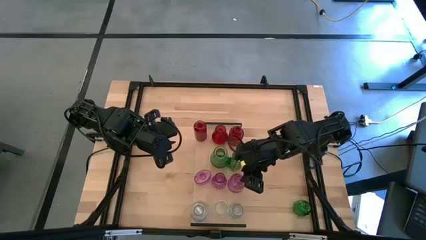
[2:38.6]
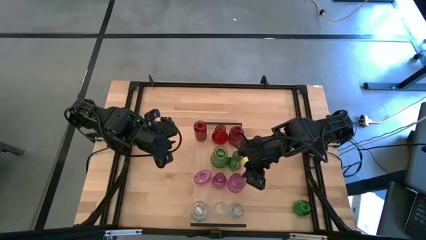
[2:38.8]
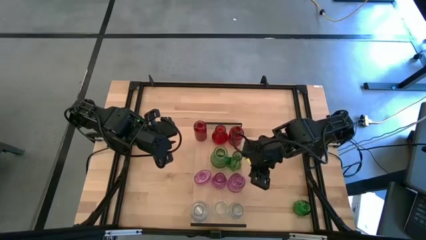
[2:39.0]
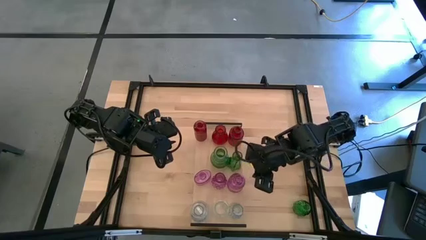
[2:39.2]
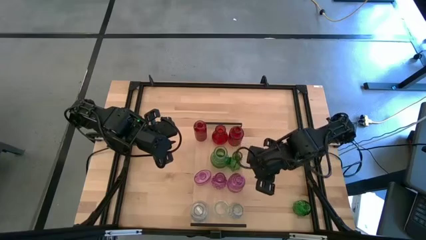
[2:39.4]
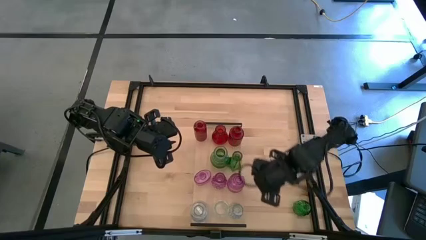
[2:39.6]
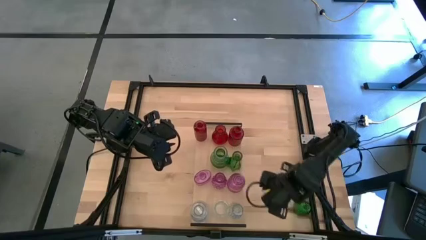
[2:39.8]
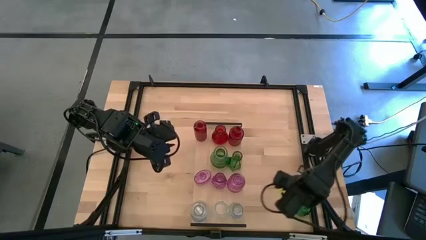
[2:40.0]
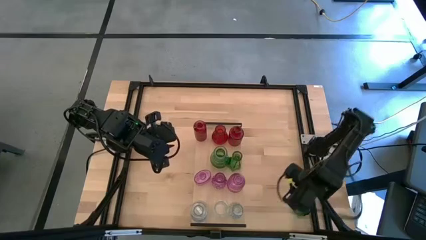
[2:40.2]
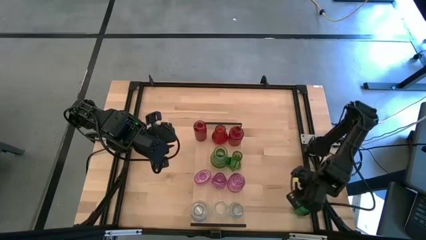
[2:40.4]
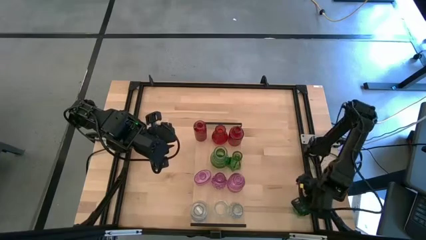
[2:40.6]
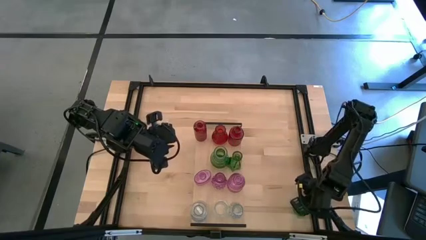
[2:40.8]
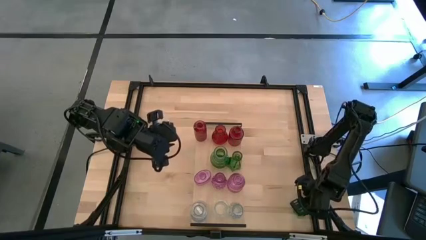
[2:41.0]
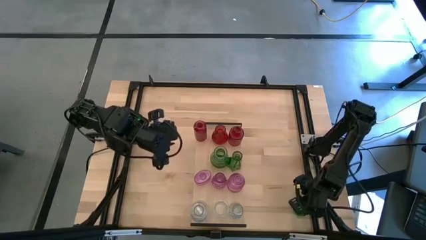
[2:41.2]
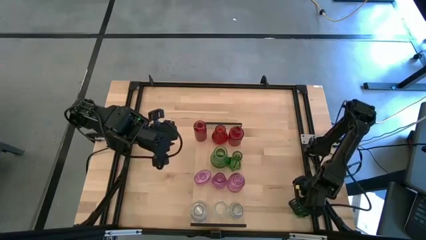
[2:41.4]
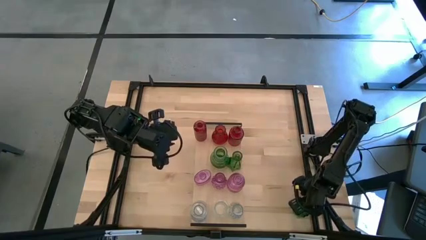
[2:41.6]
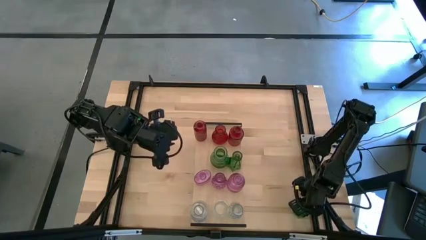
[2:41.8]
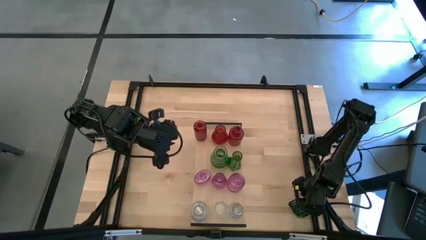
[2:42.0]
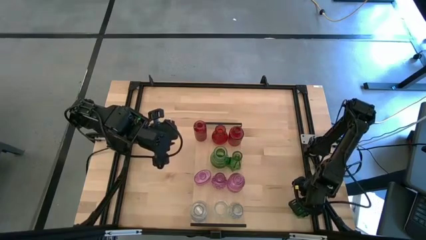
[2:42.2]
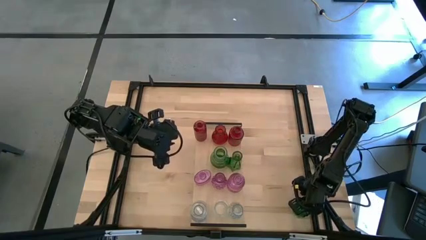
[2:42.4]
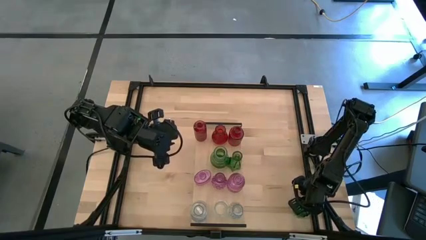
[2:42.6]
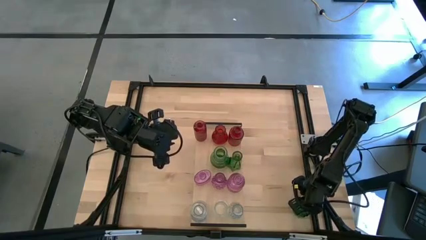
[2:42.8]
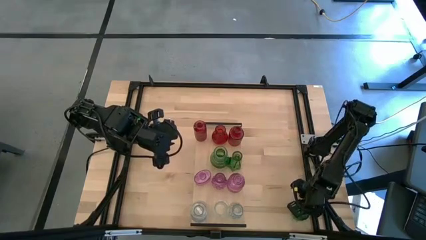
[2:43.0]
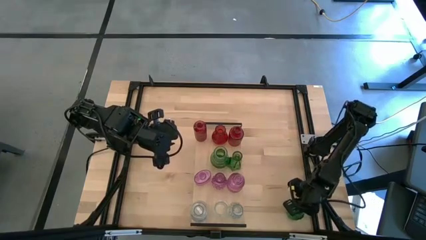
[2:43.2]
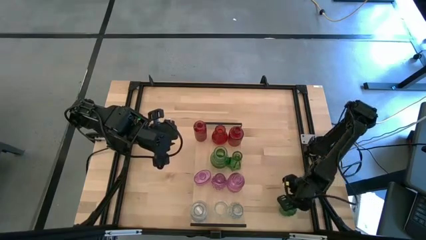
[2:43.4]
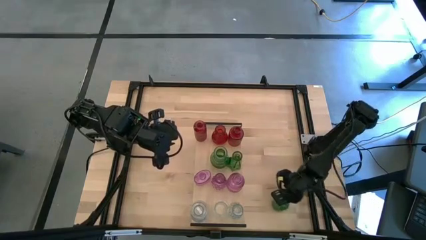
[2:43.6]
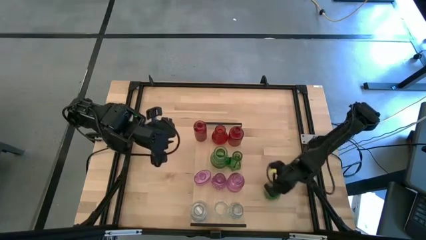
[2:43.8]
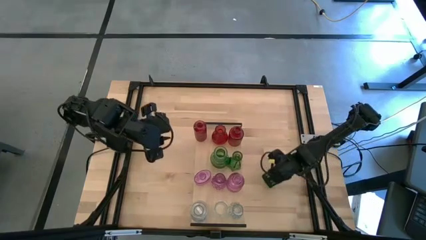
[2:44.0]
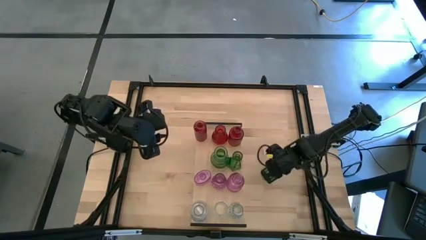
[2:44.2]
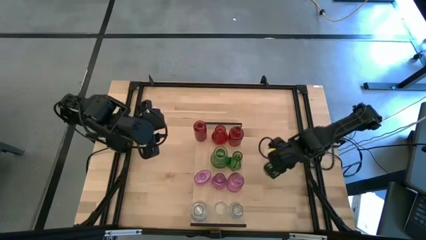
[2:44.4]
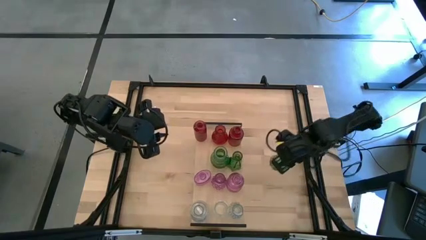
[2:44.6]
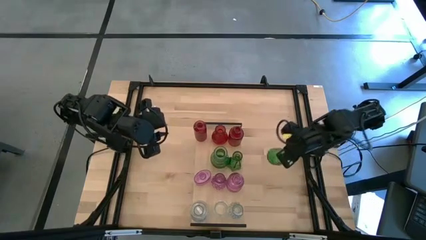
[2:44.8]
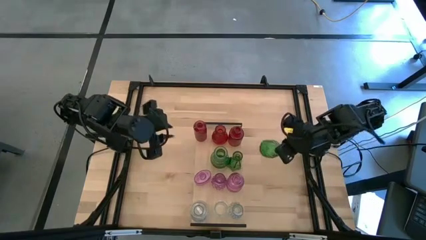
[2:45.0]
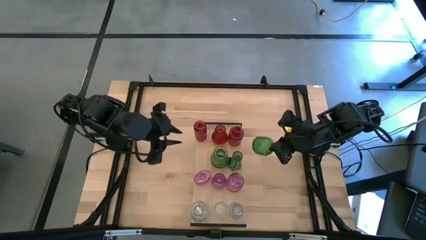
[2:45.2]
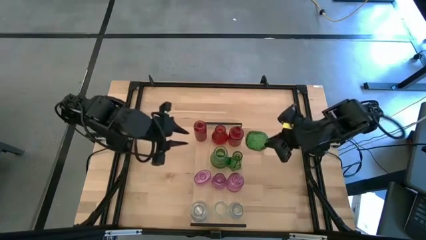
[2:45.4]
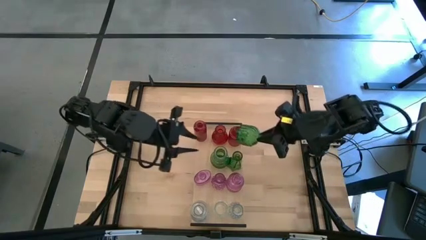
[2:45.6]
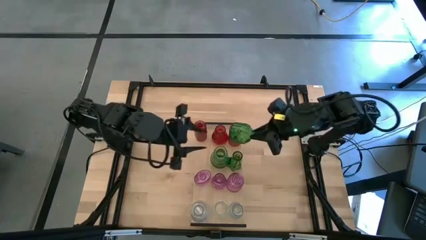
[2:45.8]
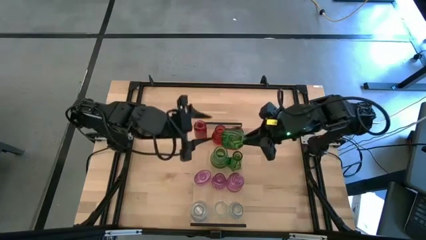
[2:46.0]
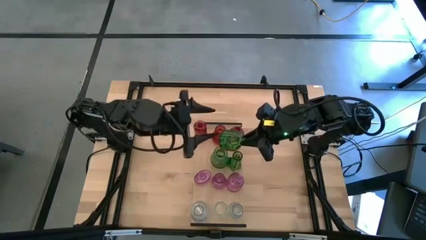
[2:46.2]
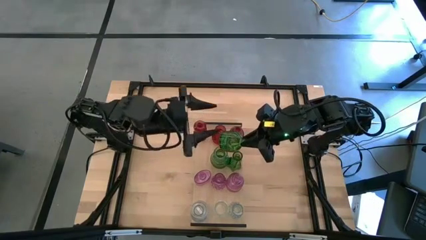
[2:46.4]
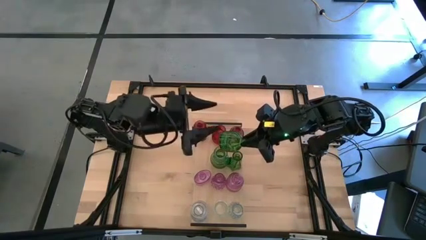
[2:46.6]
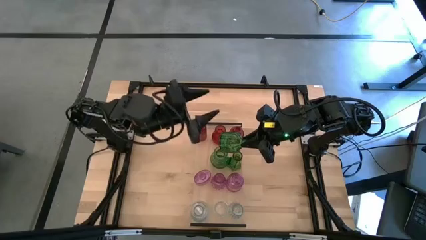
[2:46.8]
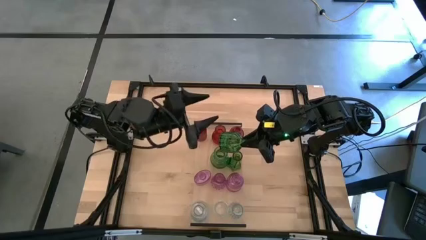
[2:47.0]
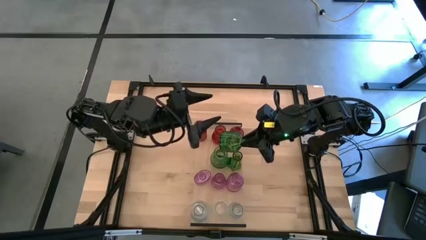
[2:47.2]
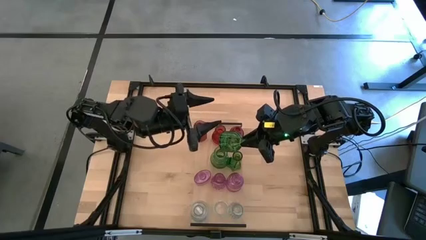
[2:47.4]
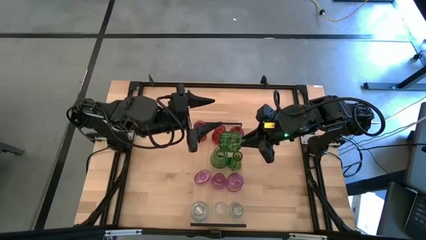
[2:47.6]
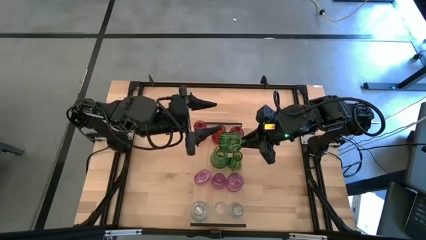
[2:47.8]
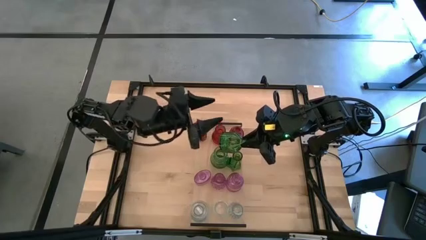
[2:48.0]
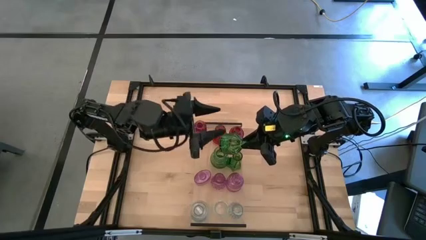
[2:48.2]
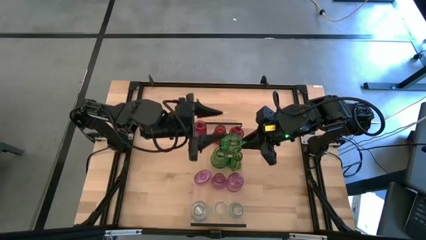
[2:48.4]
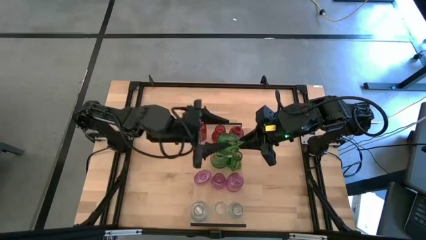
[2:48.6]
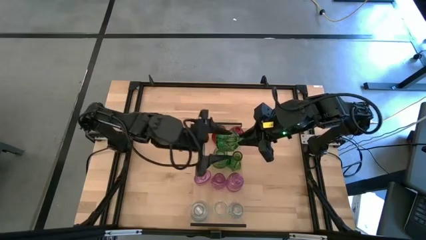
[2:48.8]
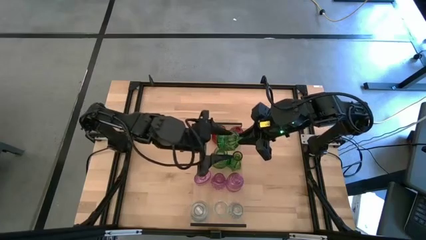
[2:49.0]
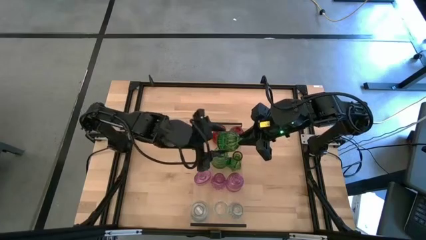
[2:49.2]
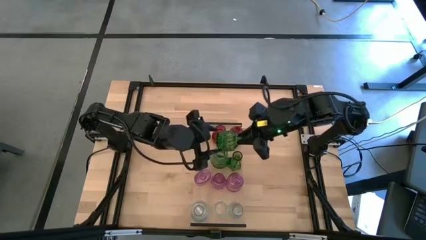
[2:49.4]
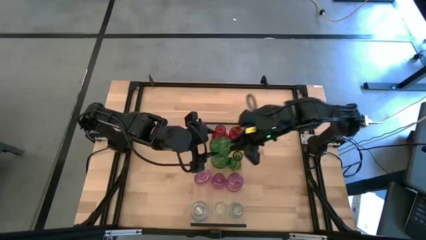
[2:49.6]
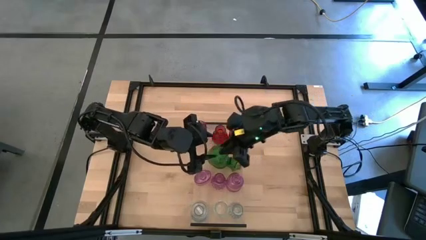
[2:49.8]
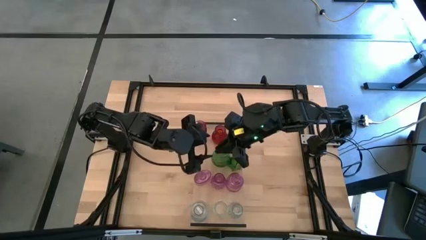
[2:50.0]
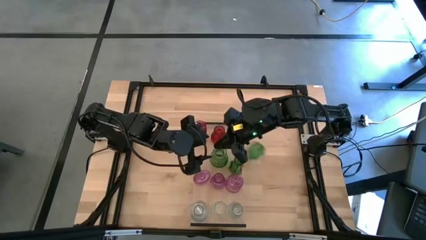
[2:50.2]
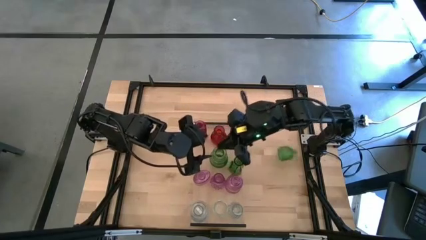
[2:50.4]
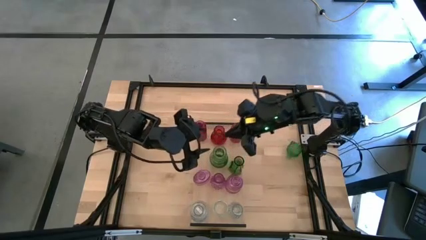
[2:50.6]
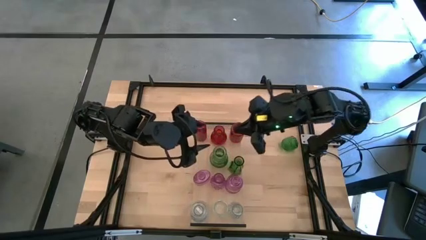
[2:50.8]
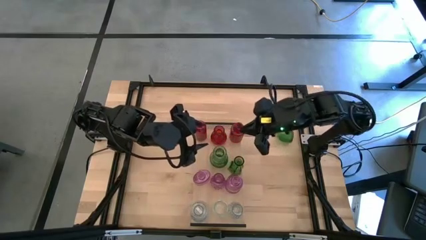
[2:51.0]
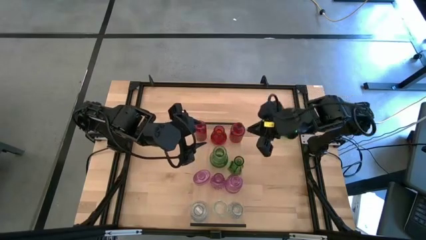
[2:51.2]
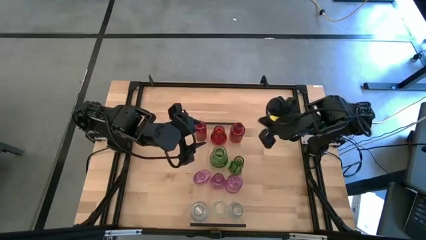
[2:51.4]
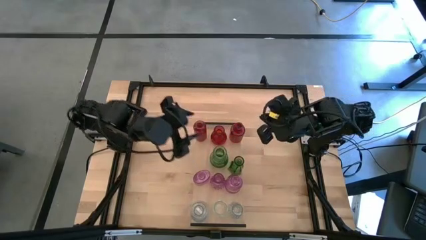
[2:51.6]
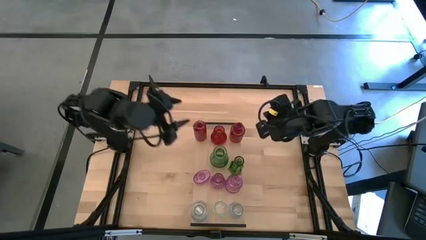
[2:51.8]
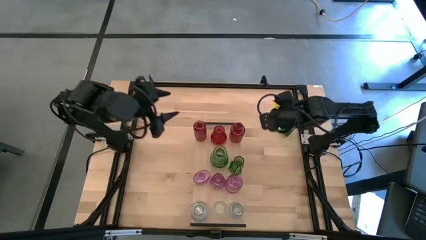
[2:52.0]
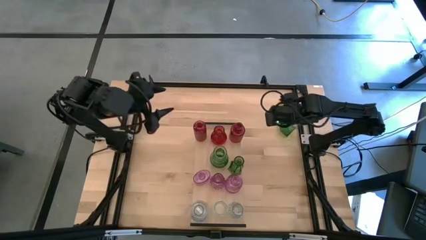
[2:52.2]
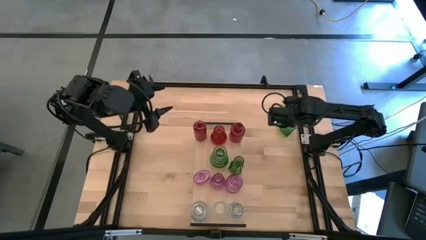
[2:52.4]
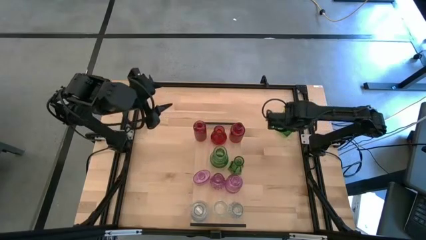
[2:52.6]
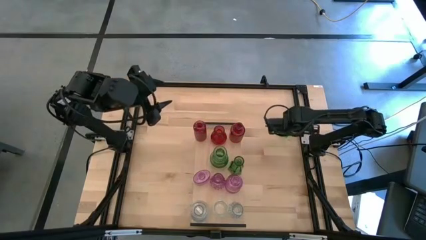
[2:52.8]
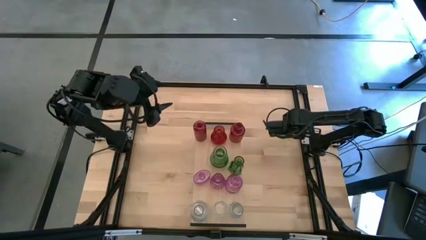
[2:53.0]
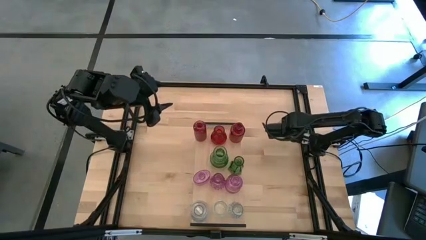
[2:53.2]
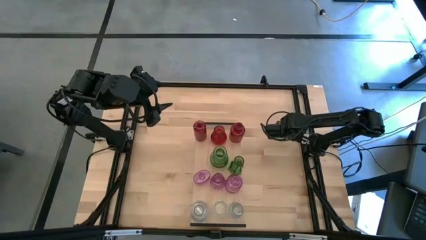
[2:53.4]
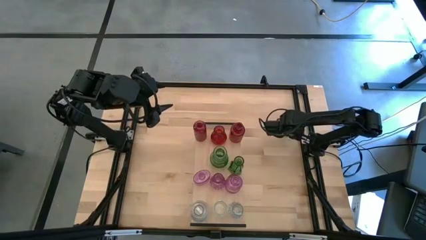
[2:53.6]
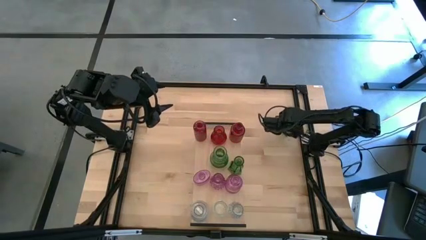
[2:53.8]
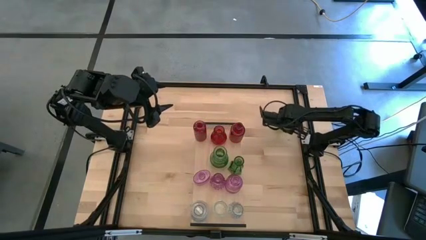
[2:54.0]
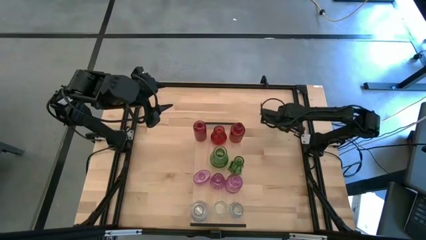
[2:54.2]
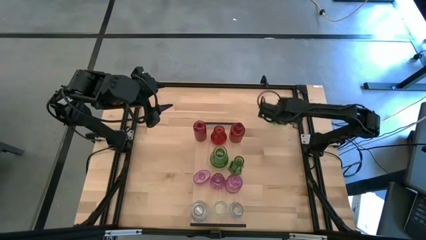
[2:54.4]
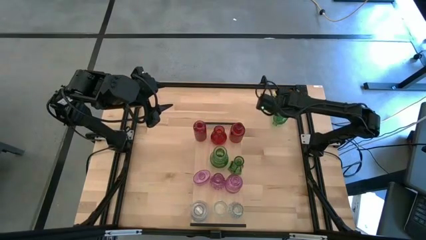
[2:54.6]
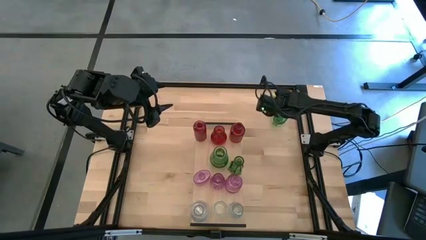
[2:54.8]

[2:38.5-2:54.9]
Task: sort vases onto shelf
Put the green vase on the shelf aligned with the other green vases

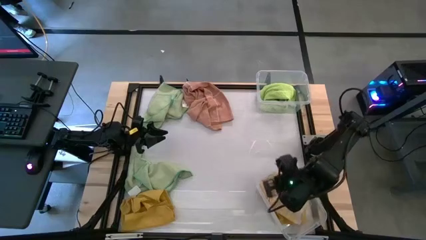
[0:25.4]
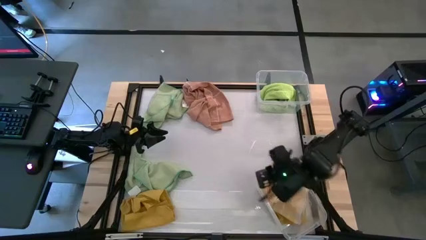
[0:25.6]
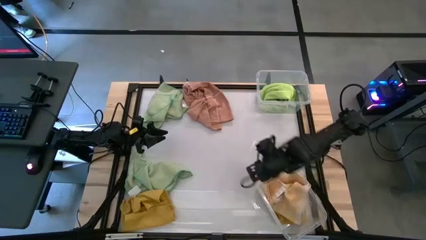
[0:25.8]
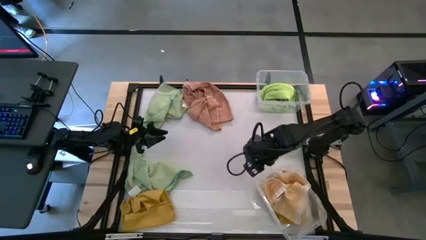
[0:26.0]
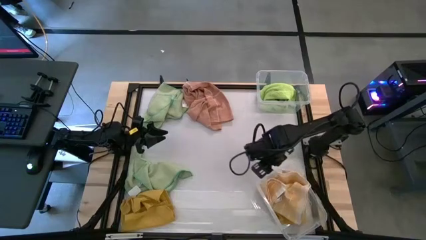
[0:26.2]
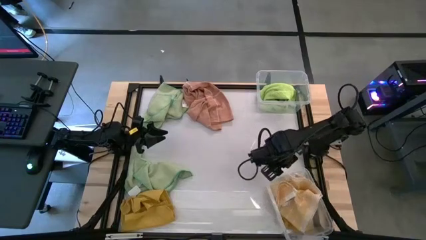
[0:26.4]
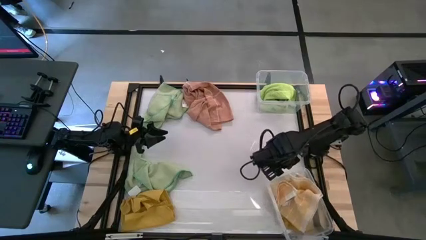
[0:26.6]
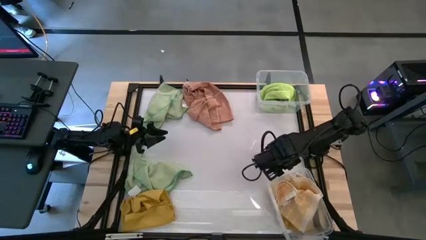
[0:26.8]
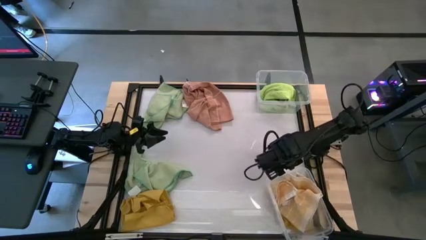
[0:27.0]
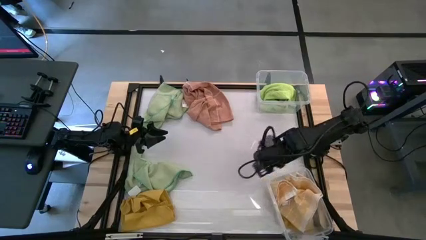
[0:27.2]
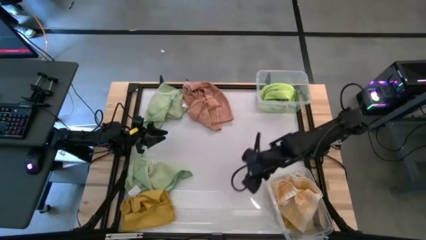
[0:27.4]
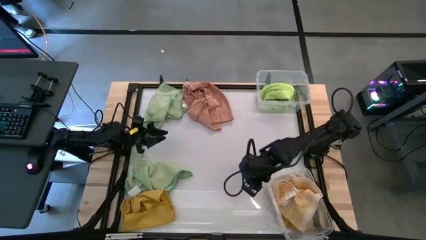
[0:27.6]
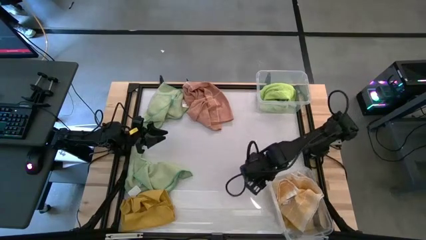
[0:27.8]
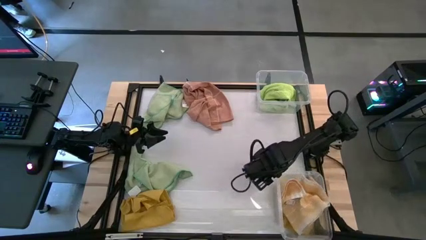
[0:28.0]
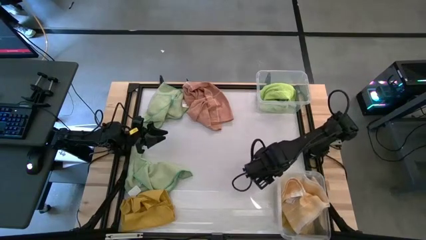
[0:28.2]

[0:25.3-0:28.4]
Task: Sort towels by color in basket
Adjust the bottom transparent bin
